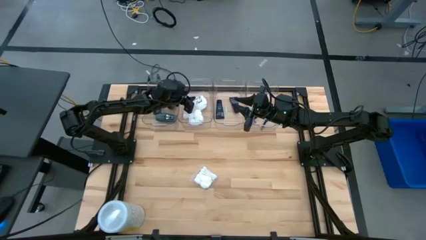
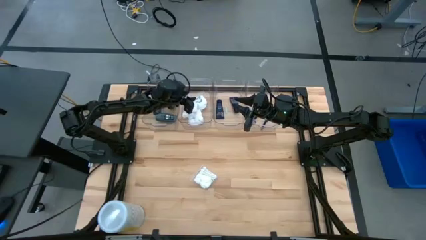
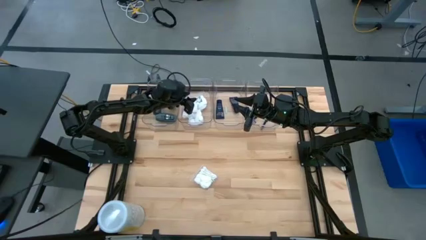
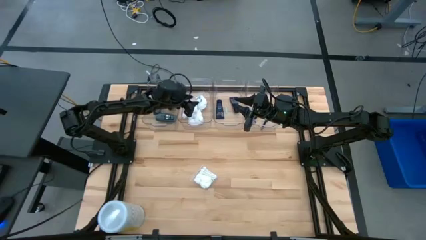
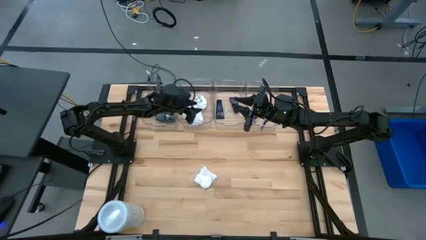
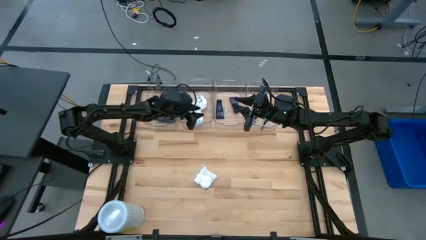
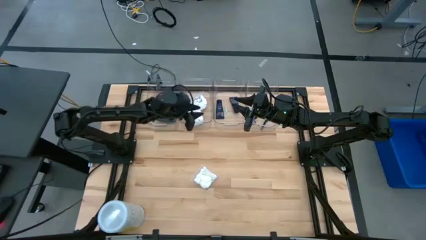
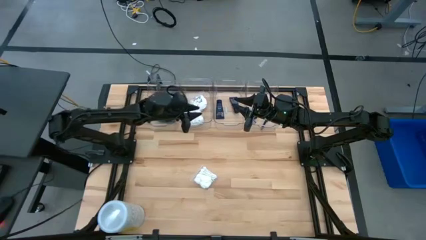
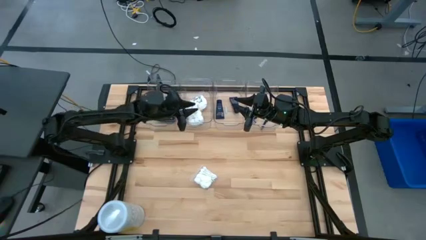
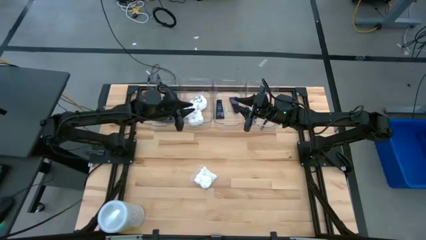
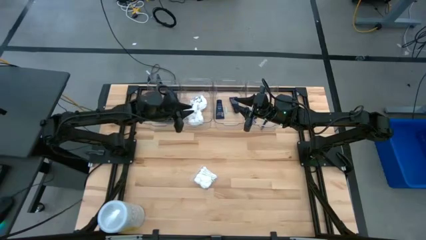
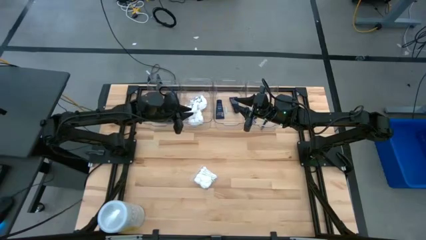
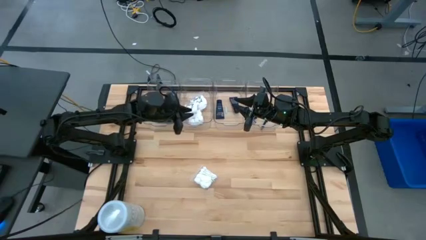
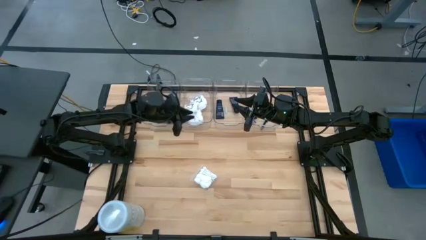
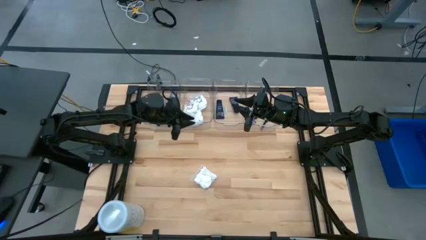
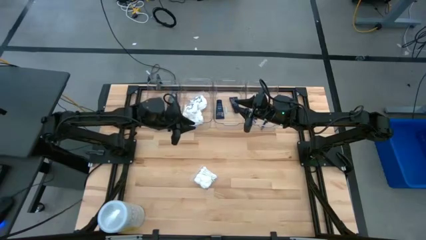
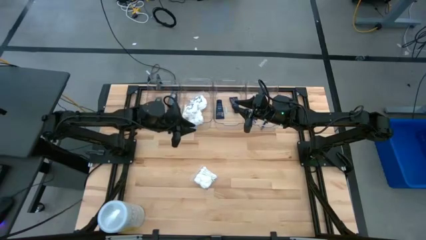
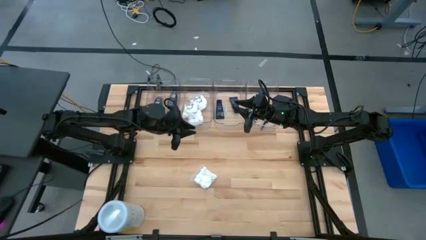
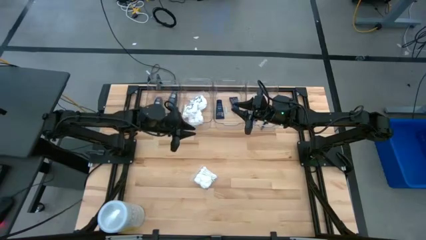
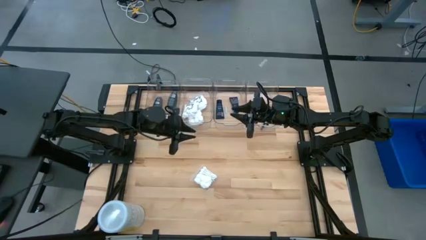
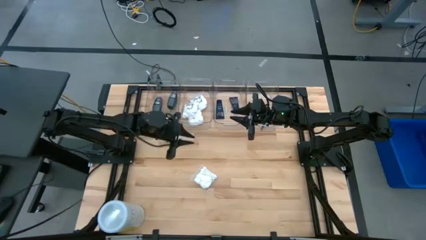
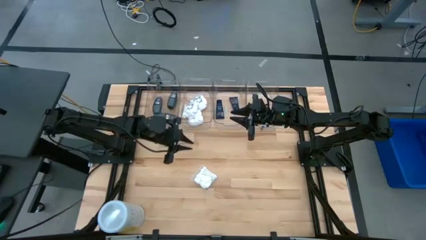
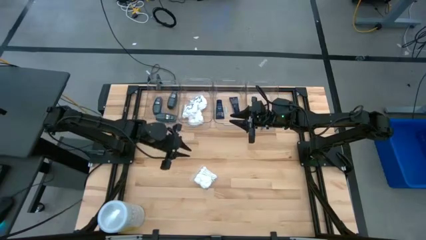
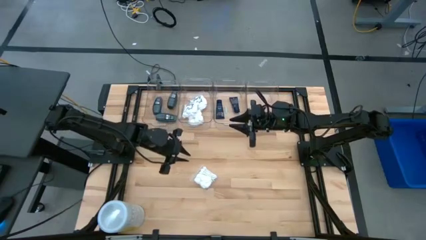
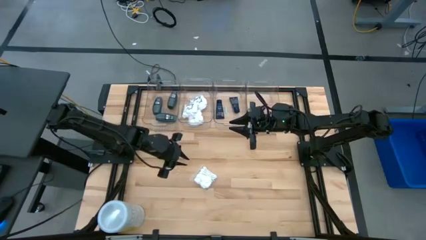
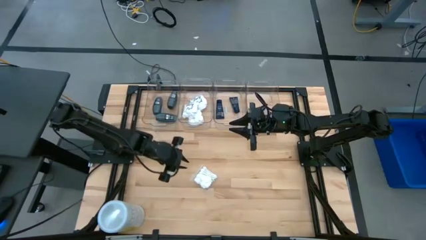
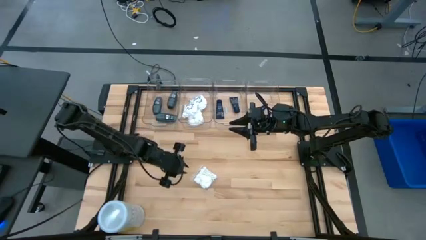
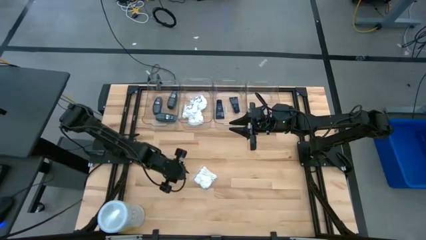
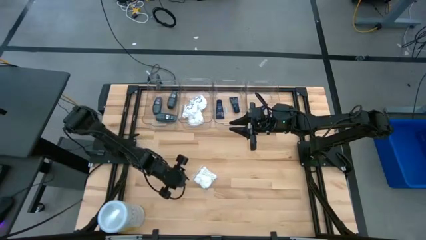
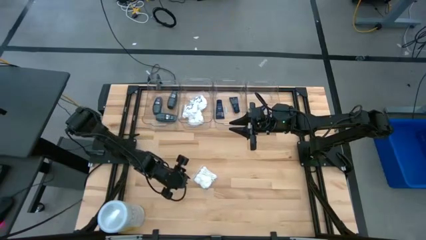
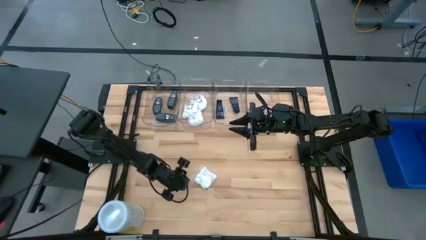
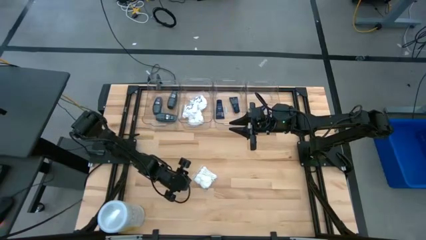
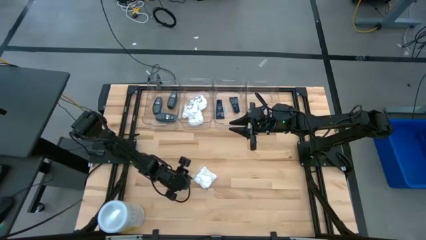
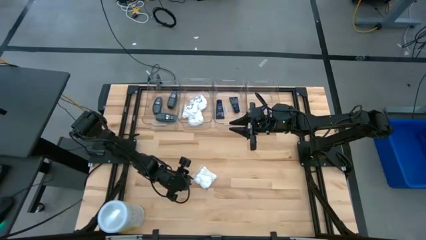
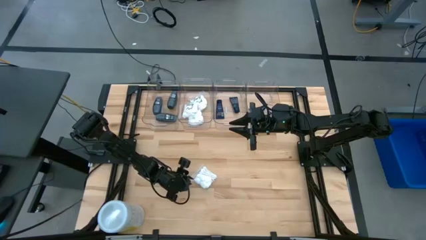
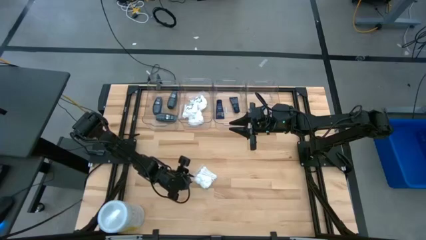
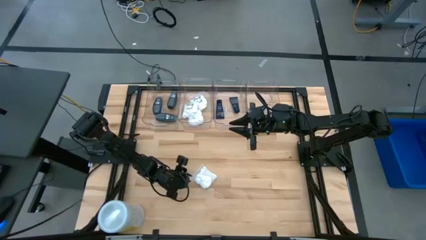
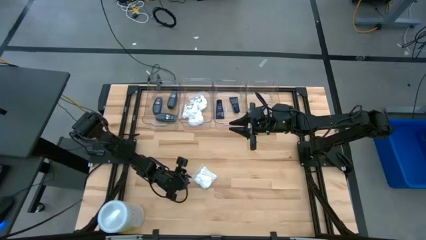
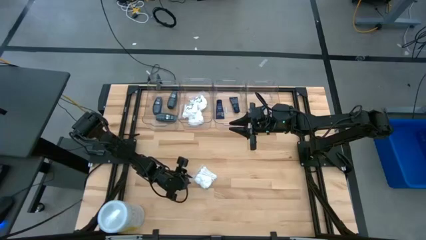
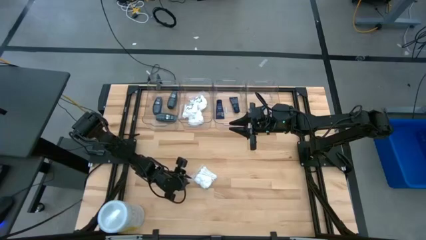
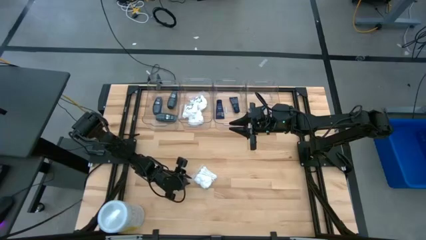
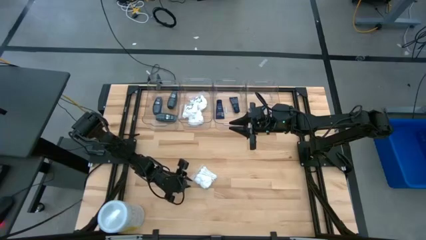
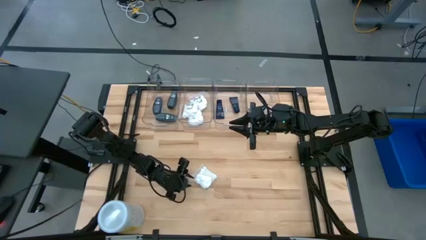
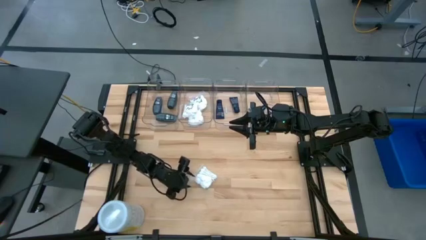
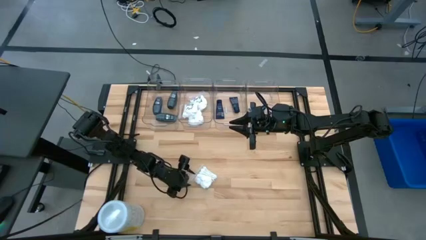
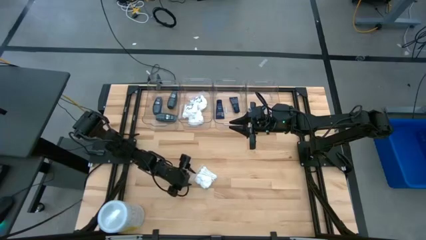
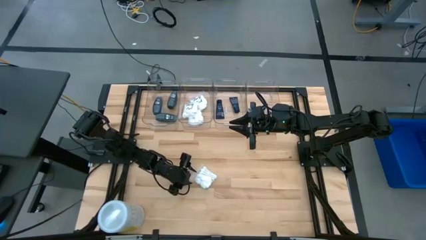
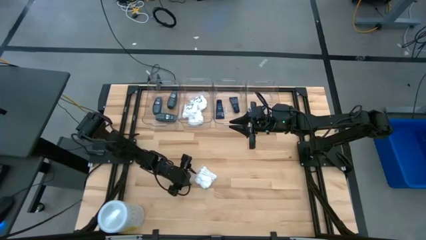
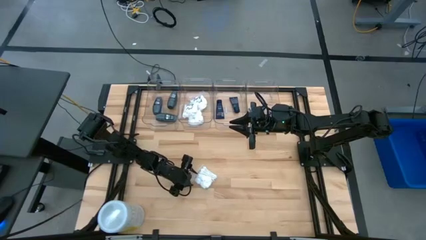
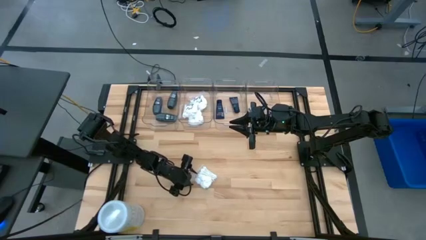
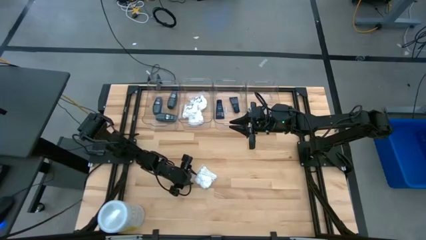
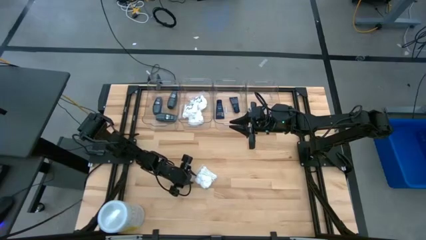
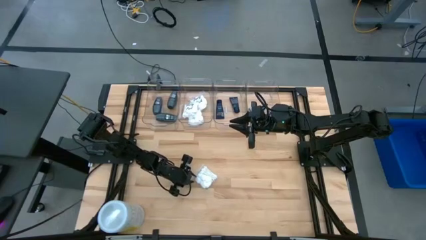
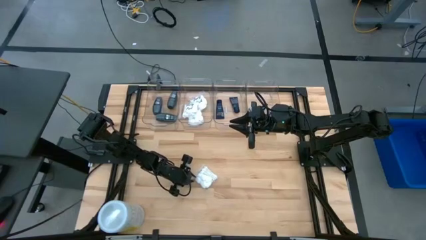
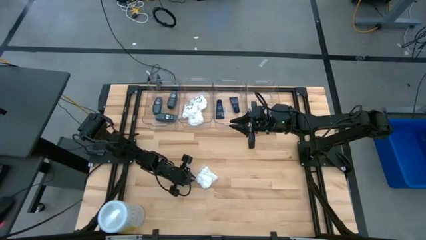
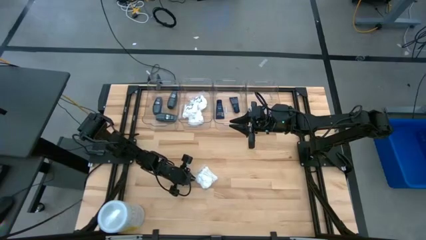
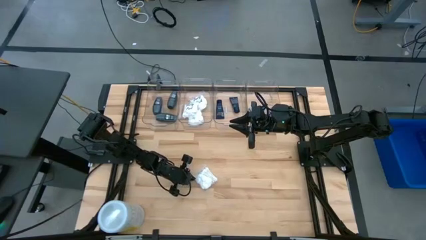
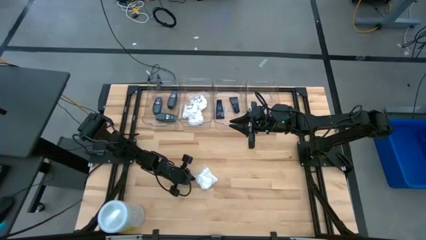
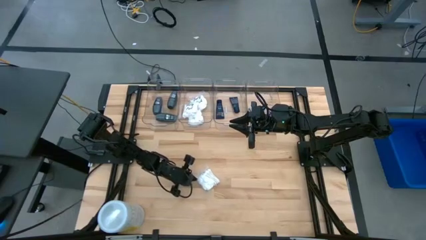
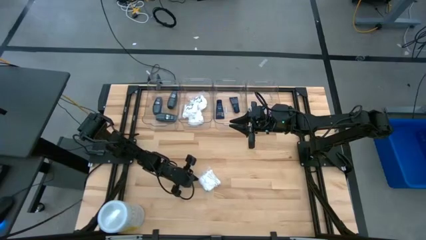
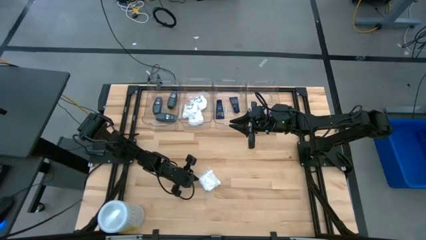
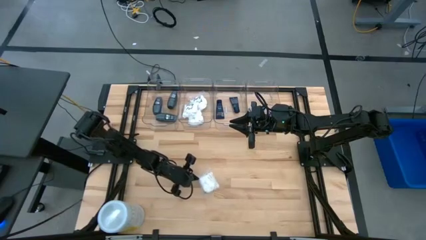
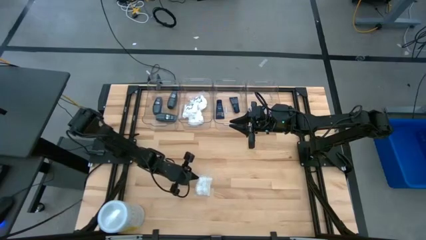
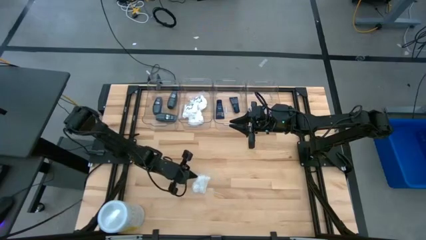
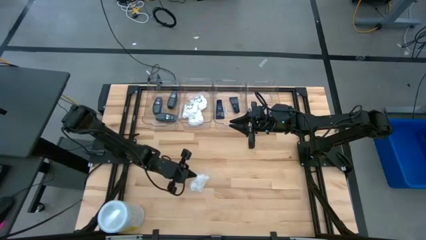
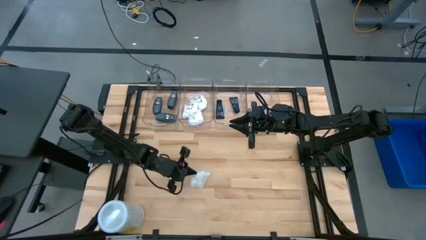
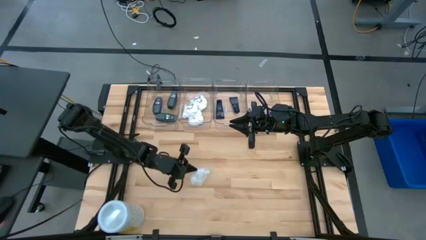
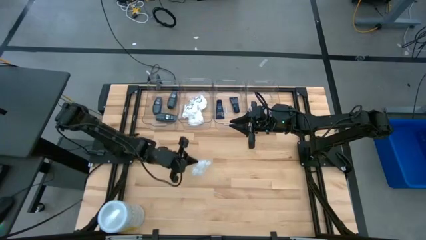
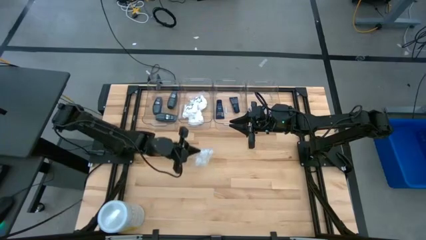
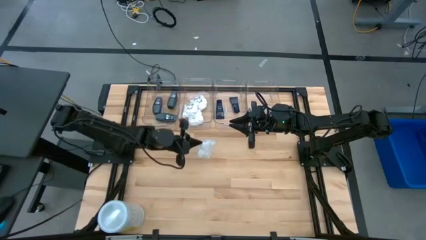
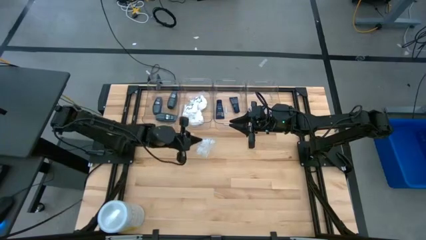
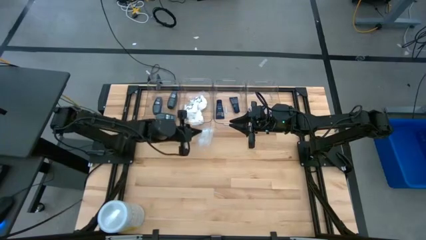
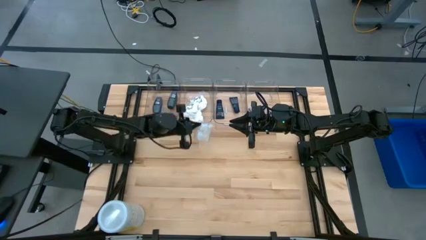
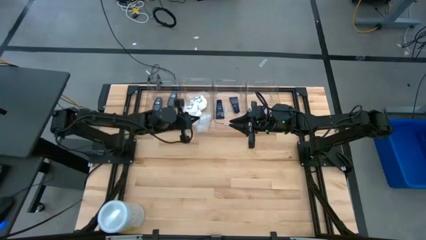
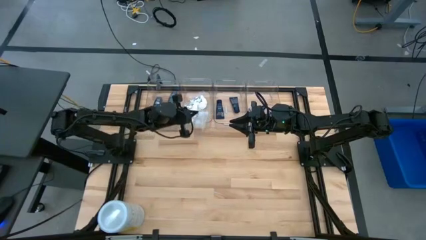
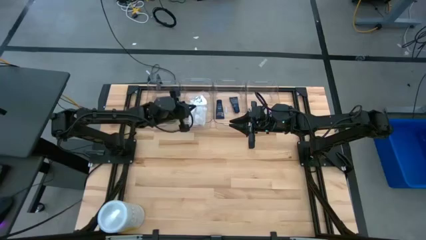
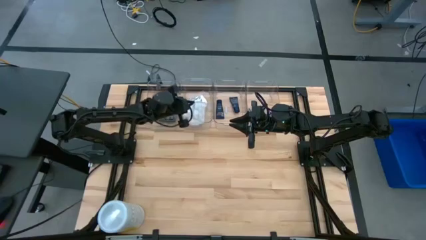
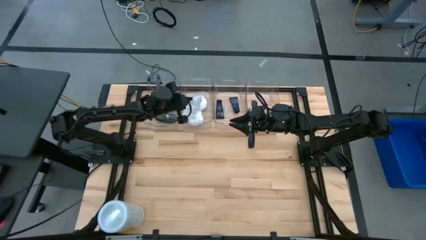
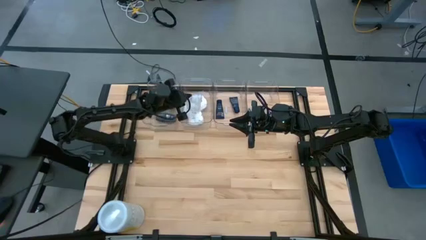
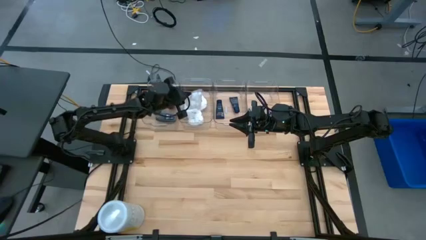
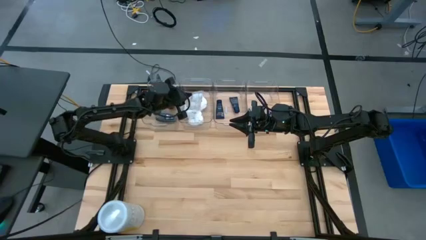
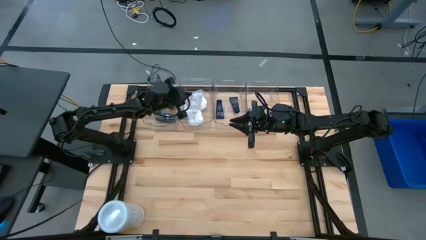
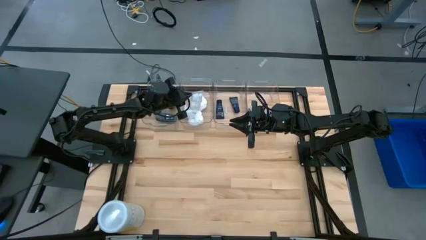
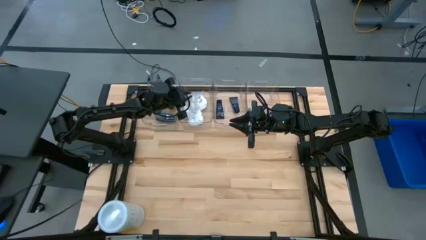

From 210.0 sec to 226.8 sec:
Task: Pick & Place Travel size toiletries
Put the white vanity pack into the middle left transparent bin
